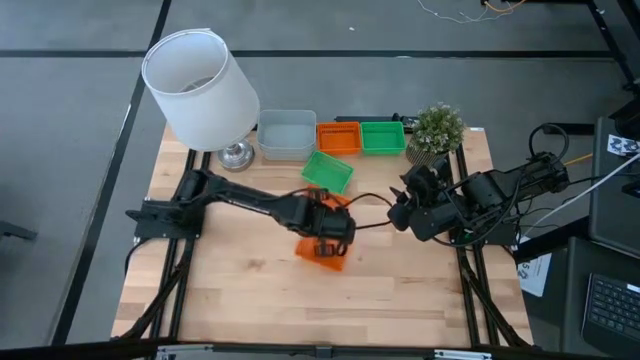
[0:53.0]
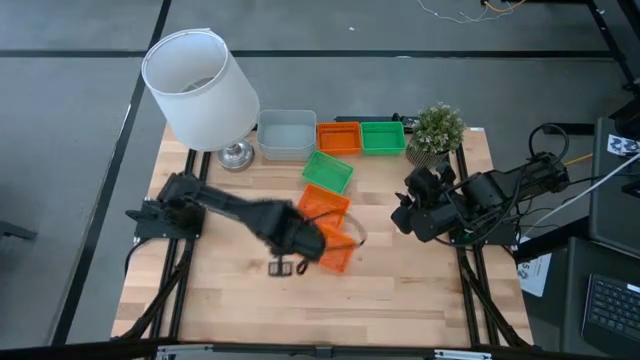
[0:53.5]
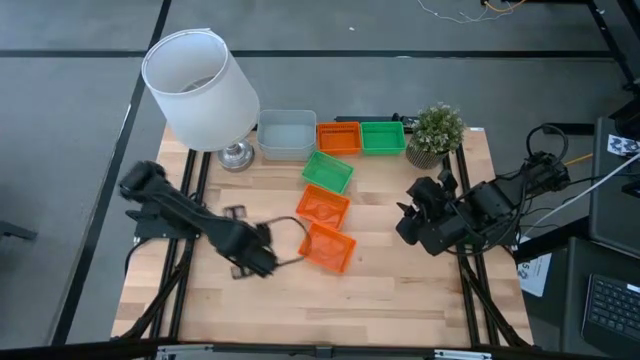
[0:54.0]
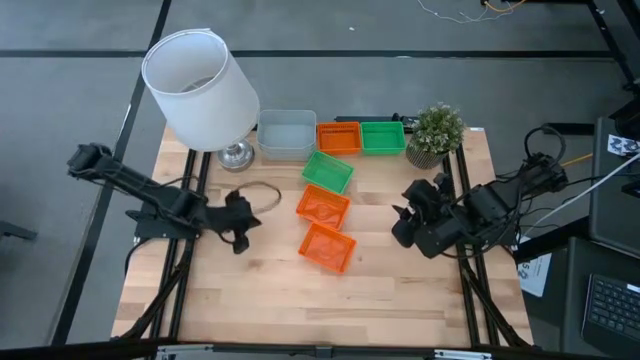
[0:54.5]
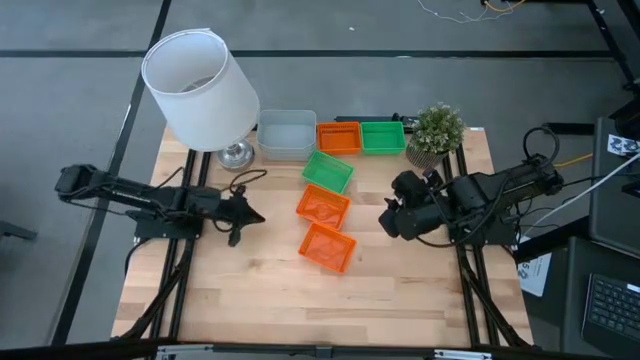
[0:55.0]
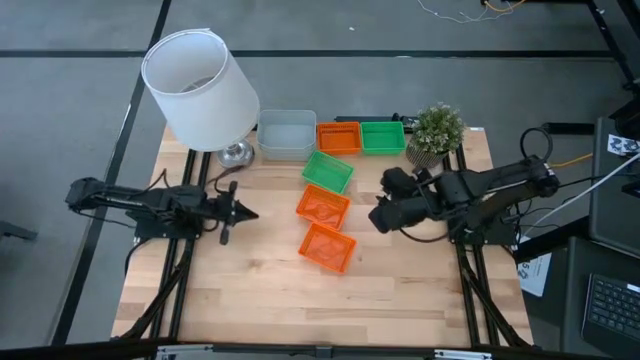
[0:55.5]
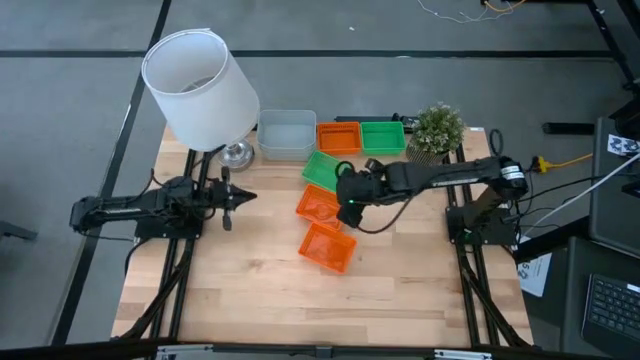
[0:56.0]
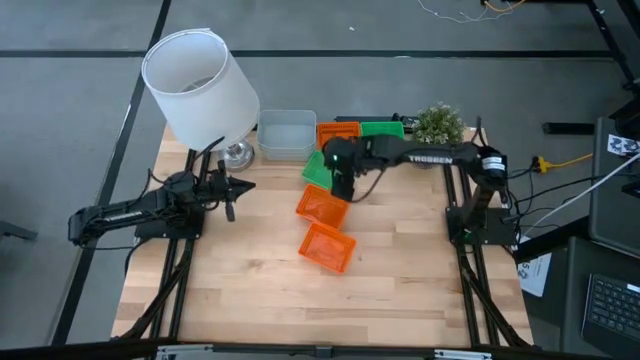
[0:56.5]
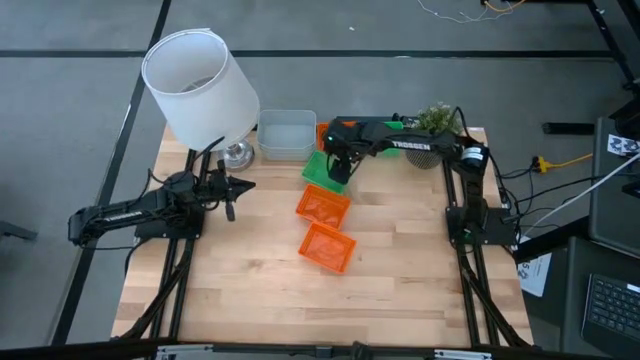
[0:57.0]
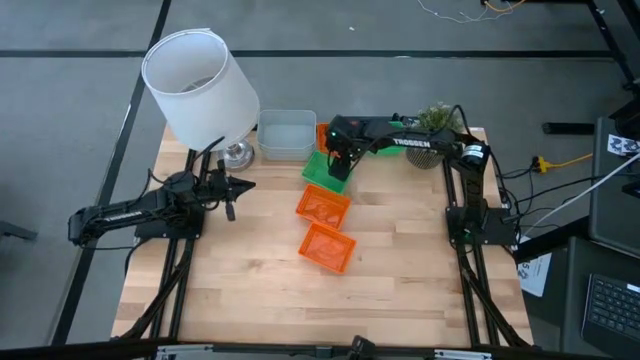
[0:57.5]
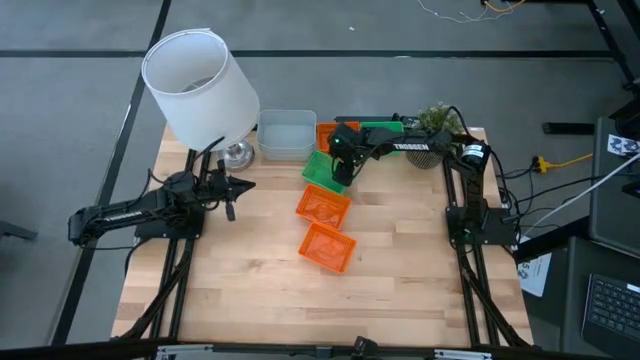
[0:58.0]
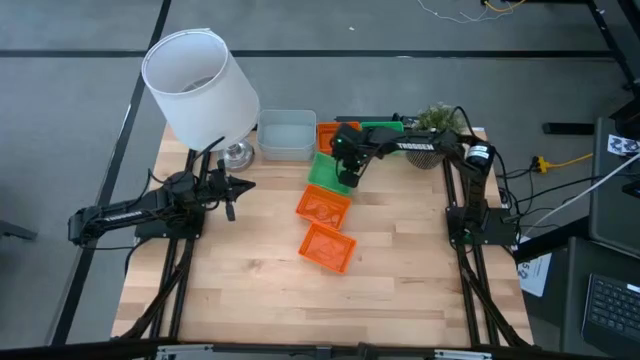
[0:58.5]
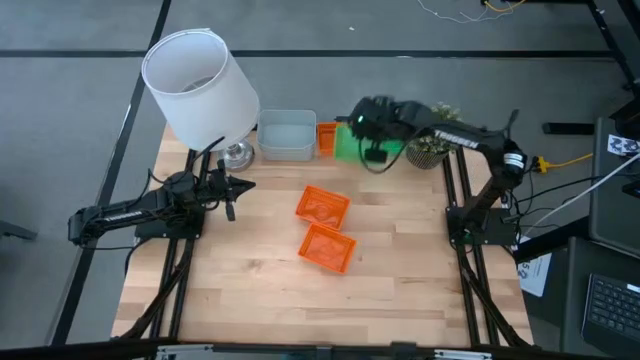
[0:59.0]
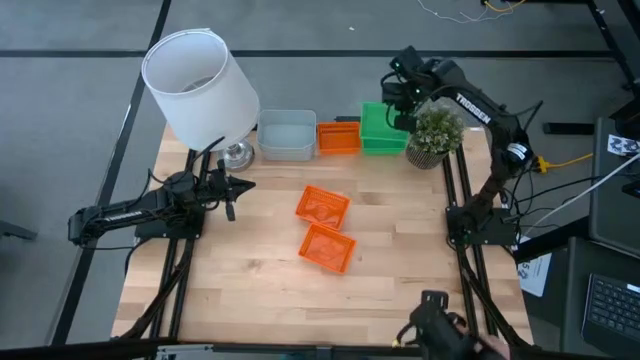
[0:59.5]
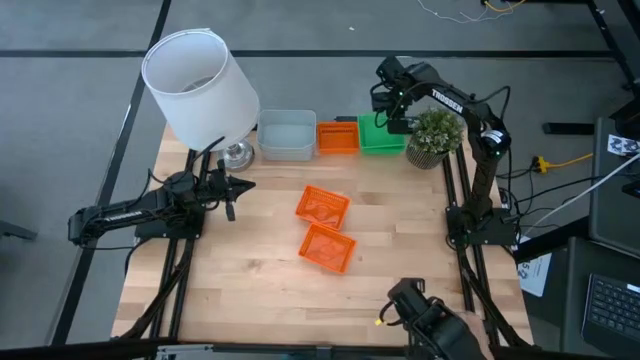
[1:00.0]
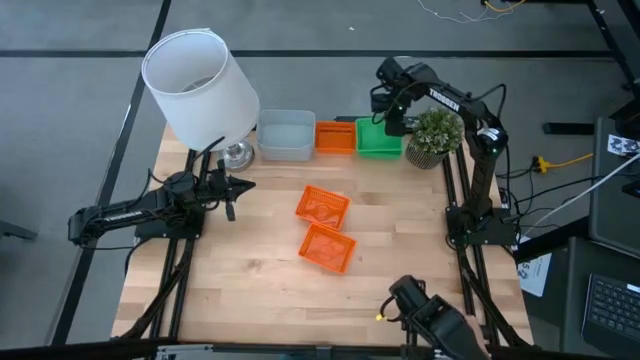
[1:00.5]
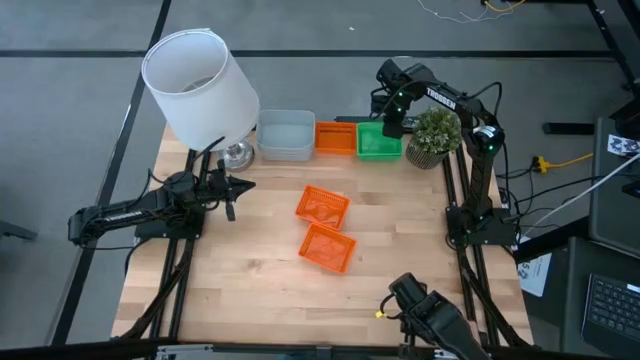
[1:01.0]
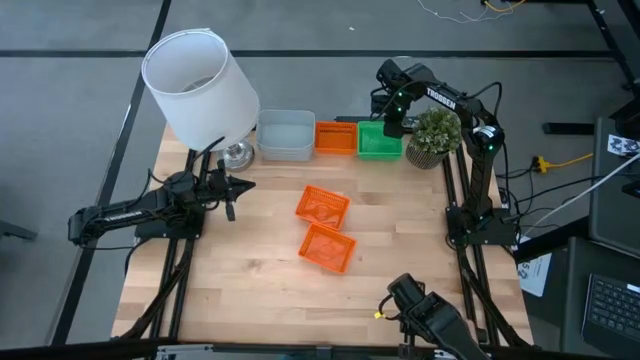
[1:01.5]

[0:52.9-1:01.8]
Stack the bottom green bin on top of the top green bin

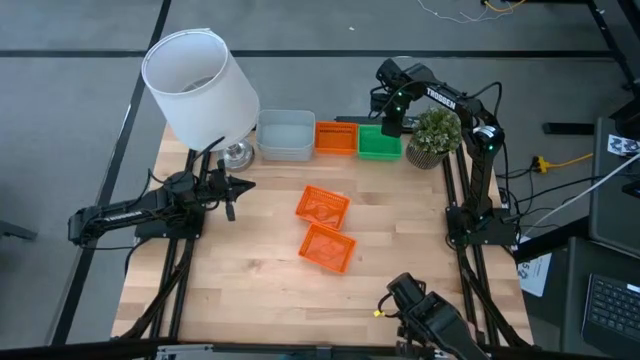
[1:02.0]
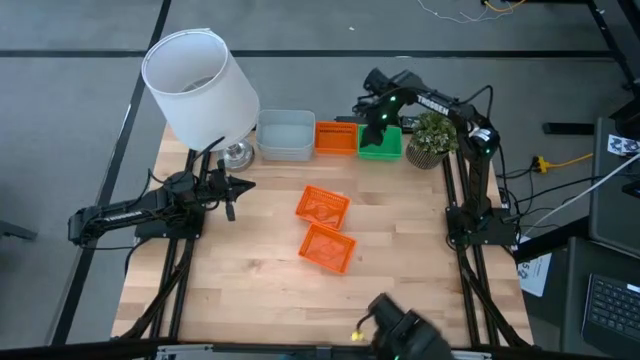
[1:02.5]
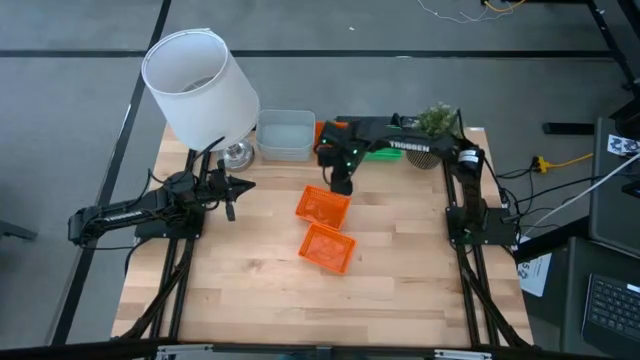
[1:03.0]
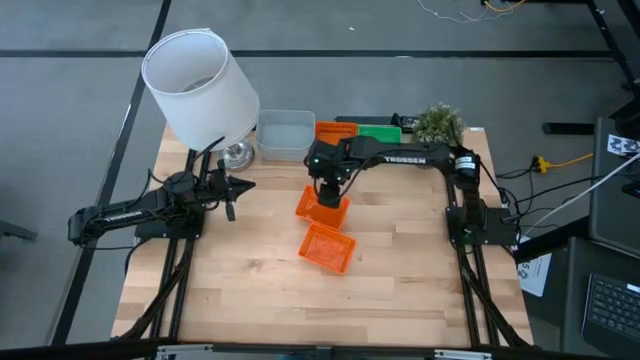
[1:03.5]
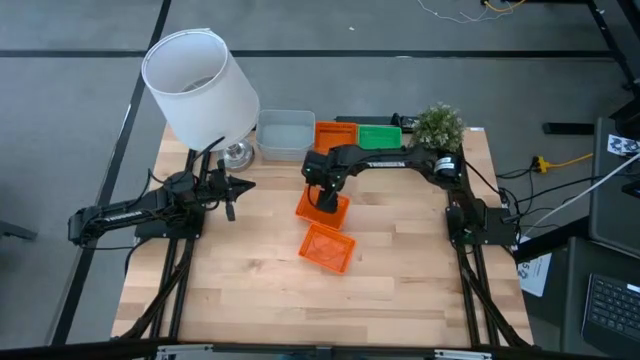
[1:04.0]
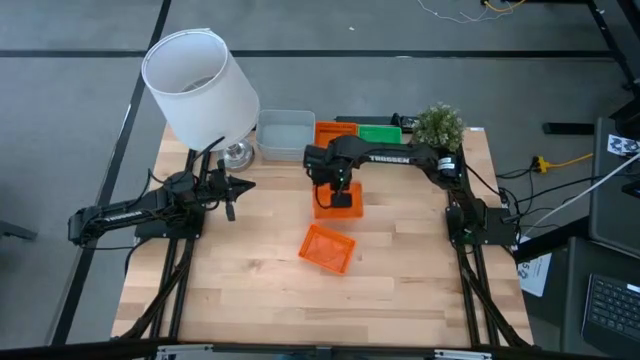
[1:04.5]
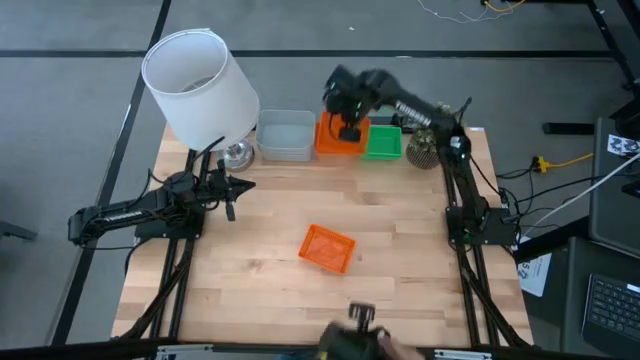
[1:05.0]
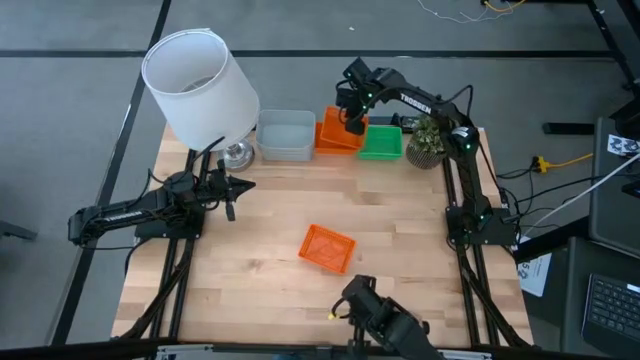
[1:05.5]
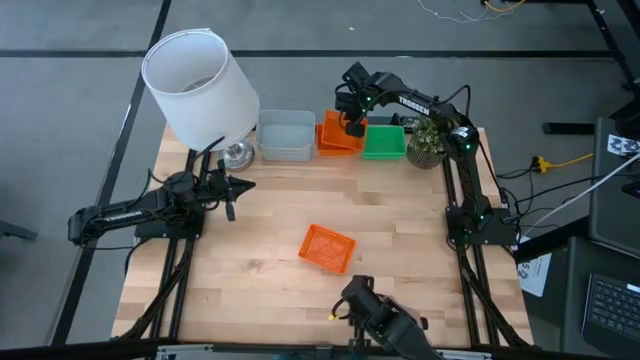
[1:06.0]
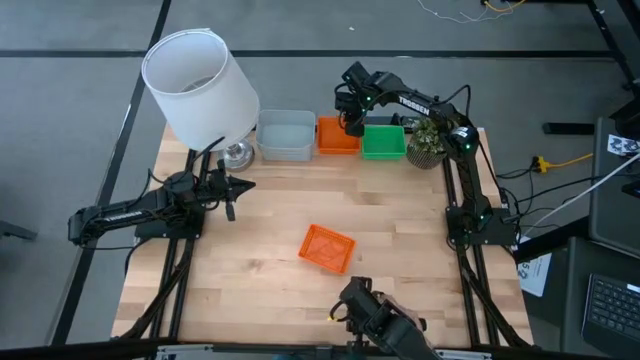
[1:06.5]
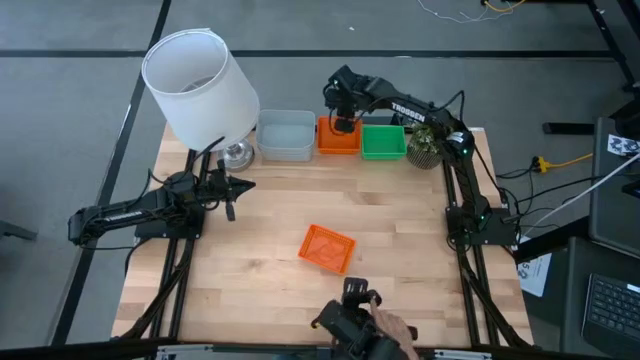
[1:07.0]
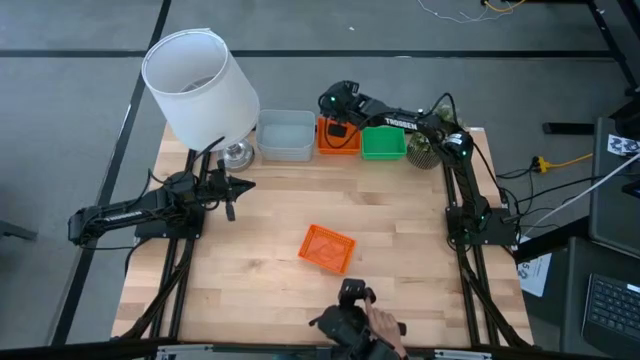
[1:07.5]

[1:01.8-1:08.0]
Stack the middle orange bin on top of the top orange bin

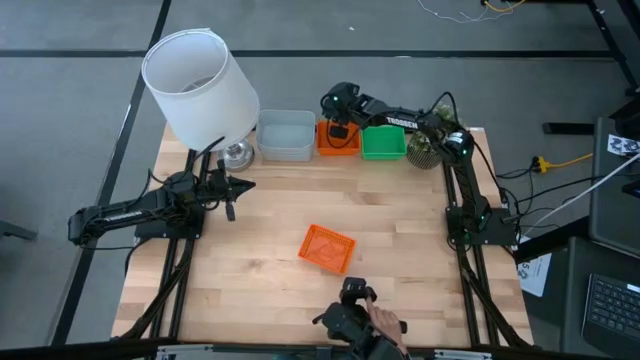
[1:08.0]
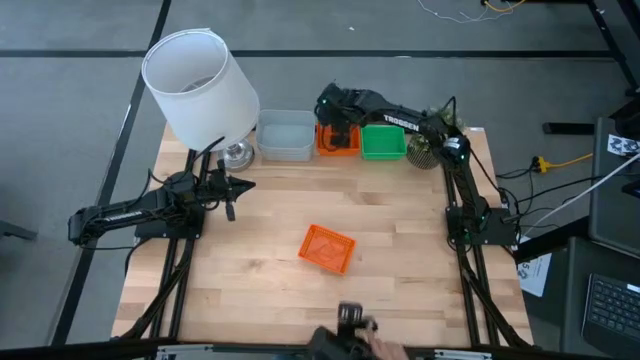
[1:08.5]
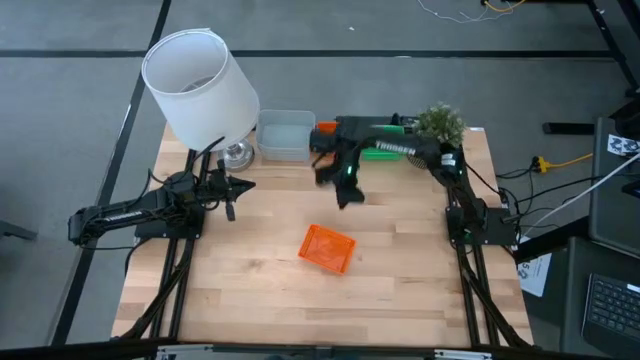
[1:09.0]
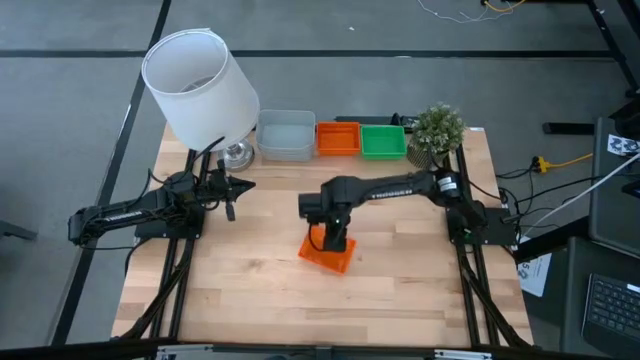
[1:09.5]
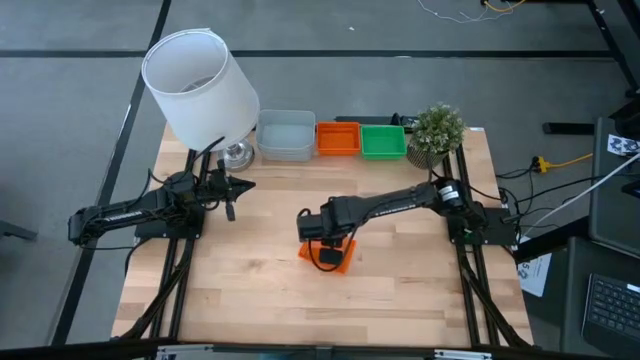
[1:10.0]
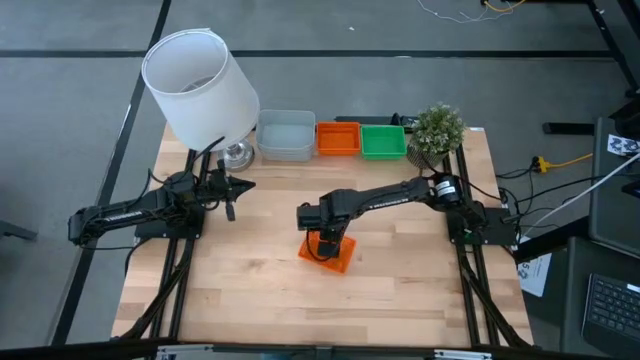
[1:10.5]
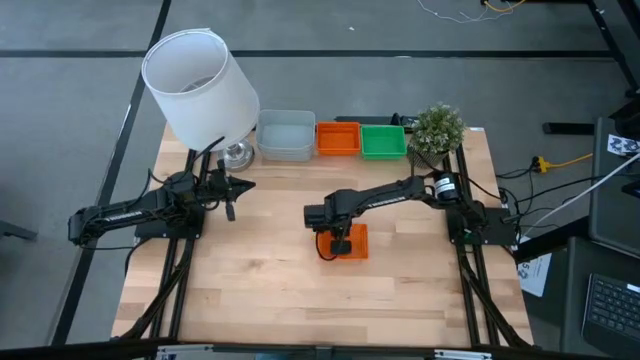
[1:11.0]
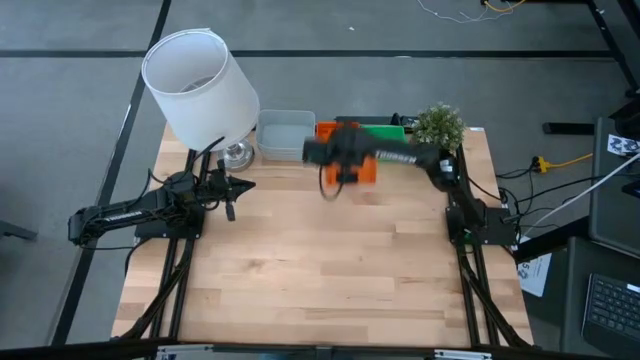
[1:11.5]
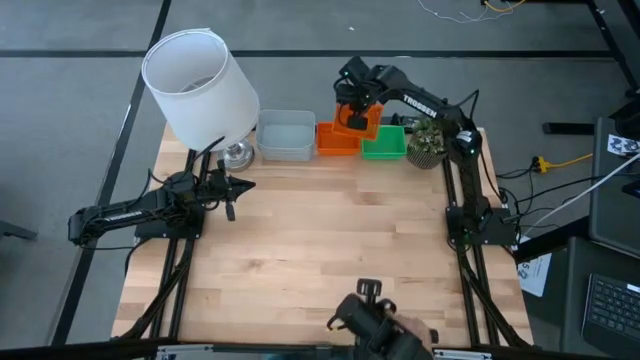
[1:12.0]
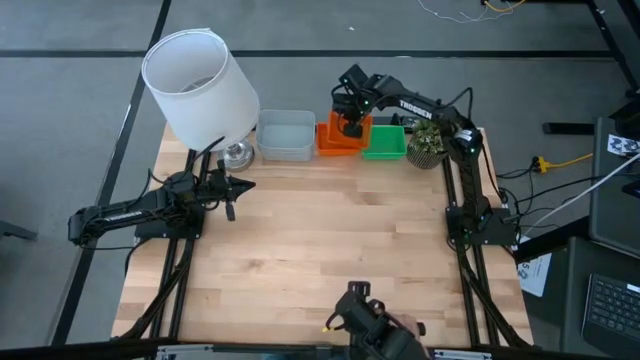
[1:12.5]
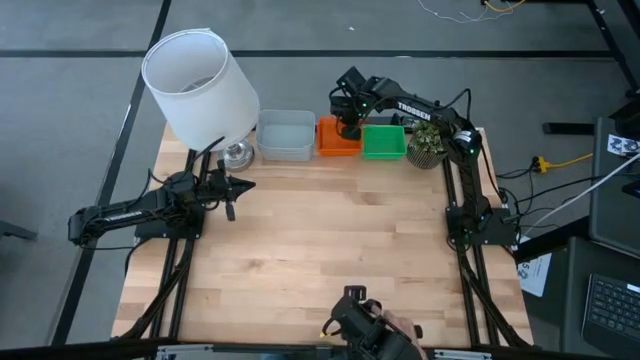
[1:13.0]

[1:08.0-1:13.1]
Stack the bottom orange bin on top of the top orange bin

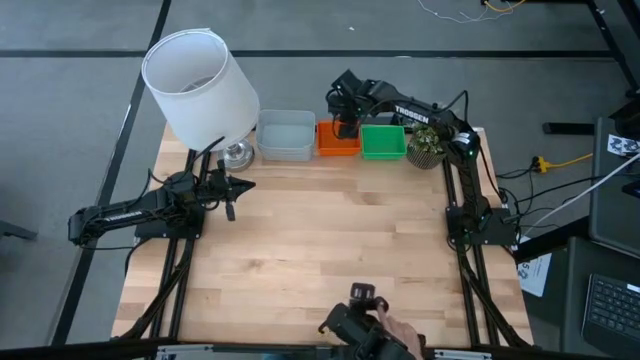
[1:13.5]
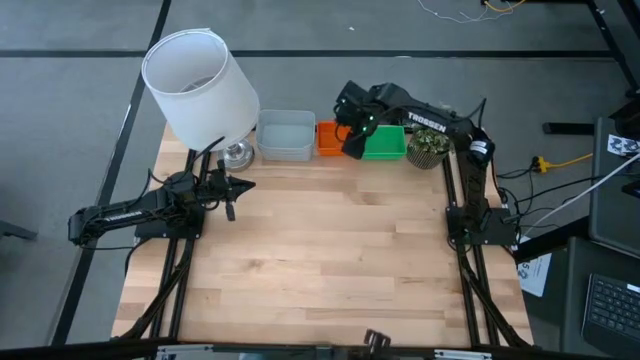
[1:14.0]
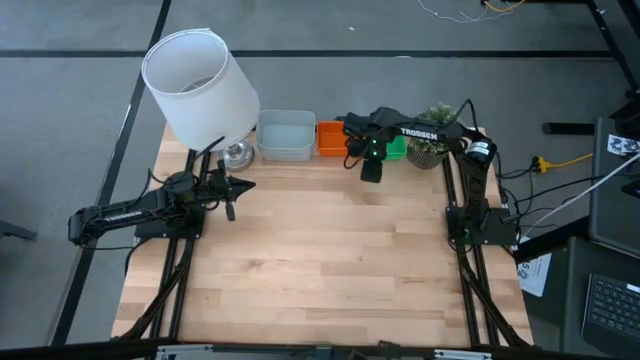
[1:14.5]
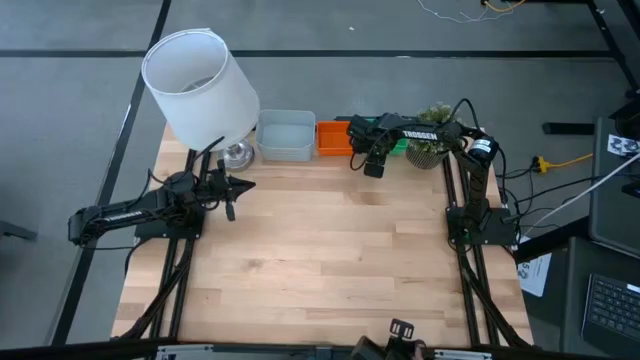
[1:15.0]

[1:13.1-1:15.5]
Adjust the stacked green bins
